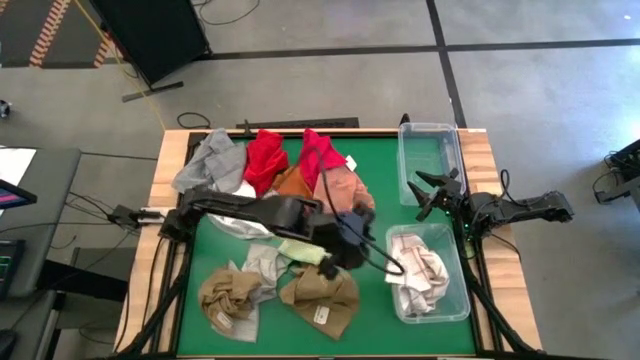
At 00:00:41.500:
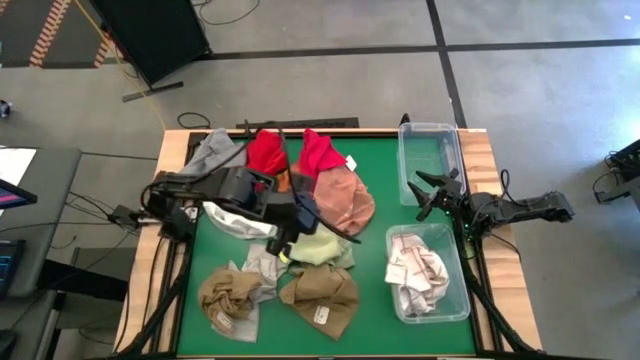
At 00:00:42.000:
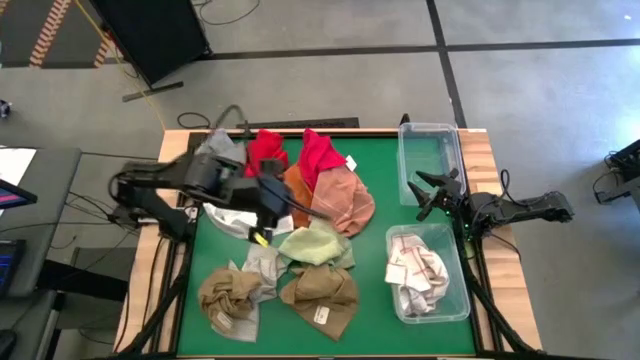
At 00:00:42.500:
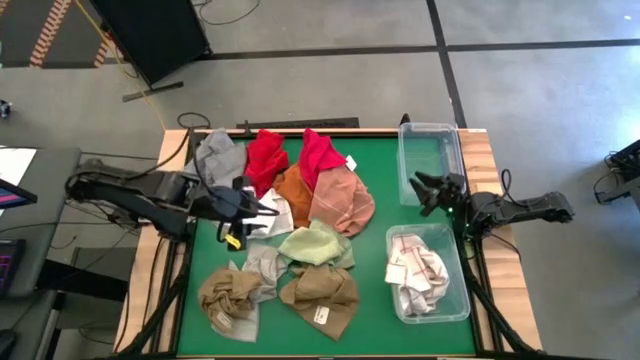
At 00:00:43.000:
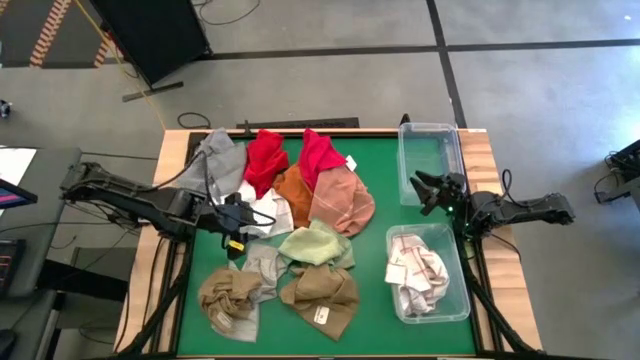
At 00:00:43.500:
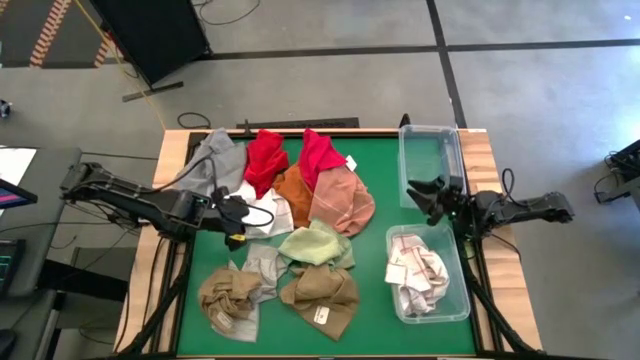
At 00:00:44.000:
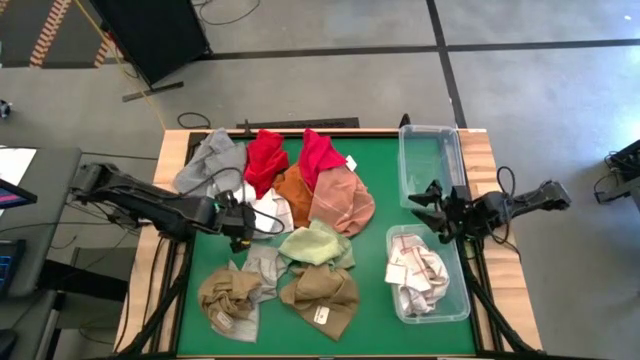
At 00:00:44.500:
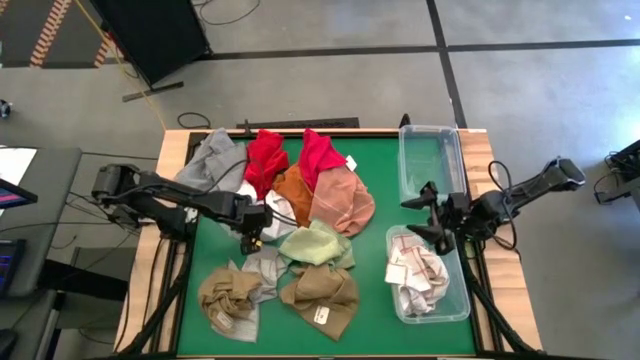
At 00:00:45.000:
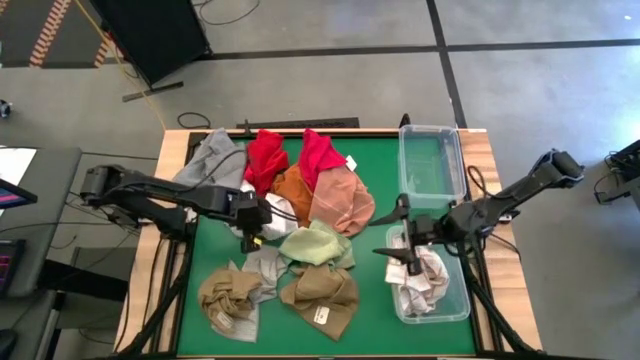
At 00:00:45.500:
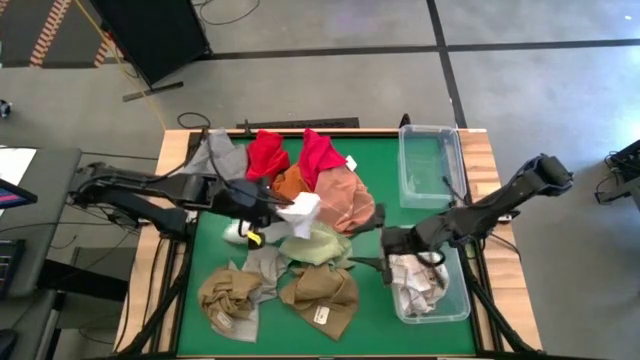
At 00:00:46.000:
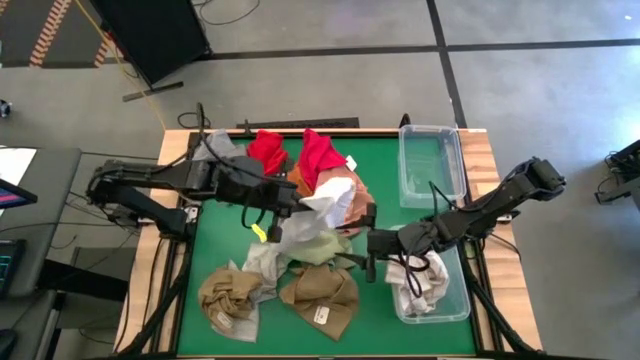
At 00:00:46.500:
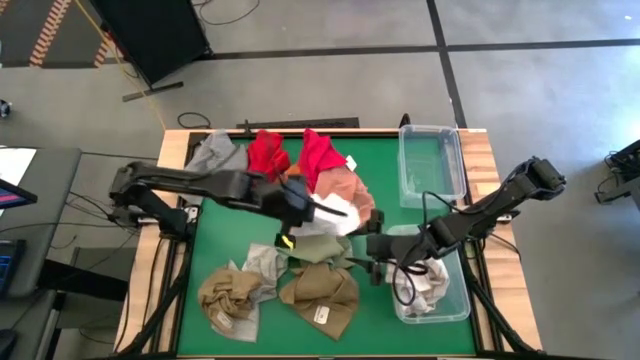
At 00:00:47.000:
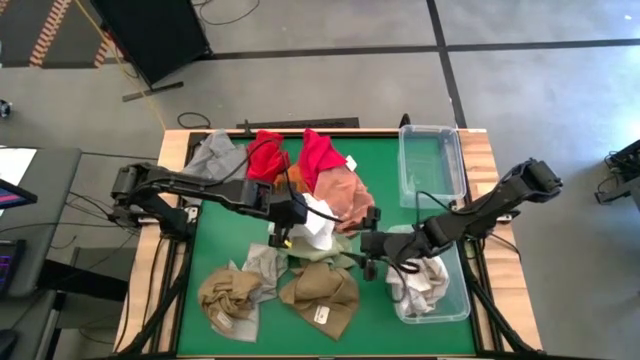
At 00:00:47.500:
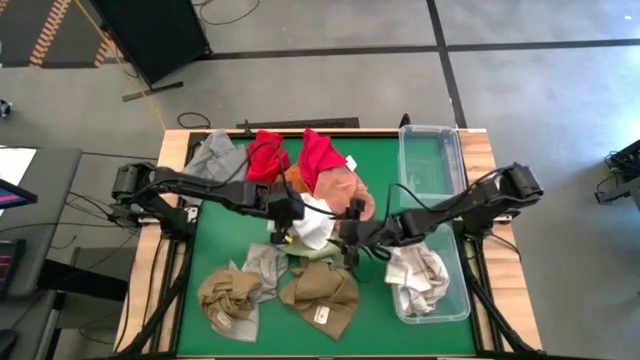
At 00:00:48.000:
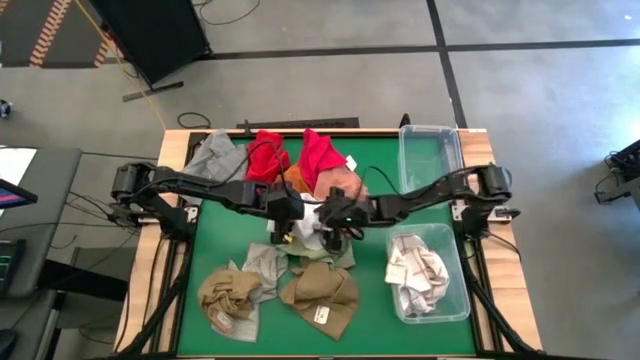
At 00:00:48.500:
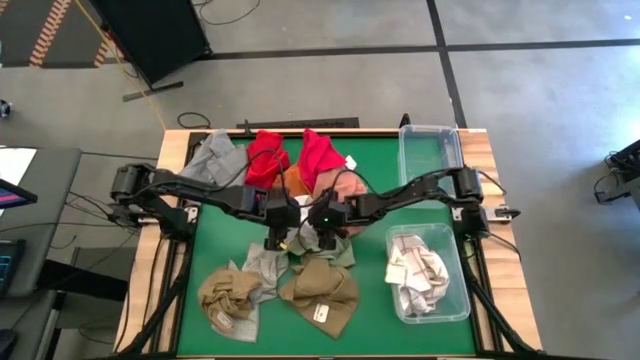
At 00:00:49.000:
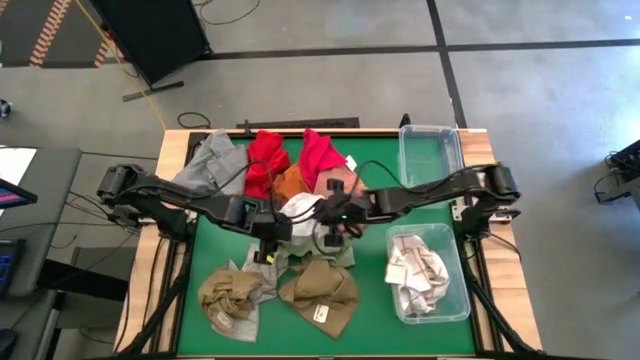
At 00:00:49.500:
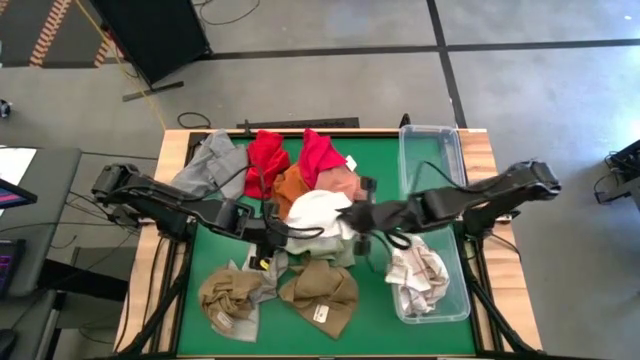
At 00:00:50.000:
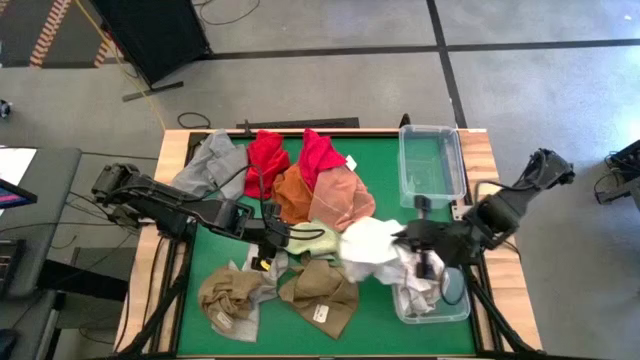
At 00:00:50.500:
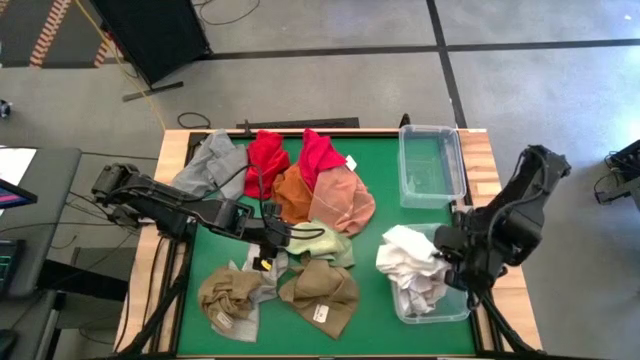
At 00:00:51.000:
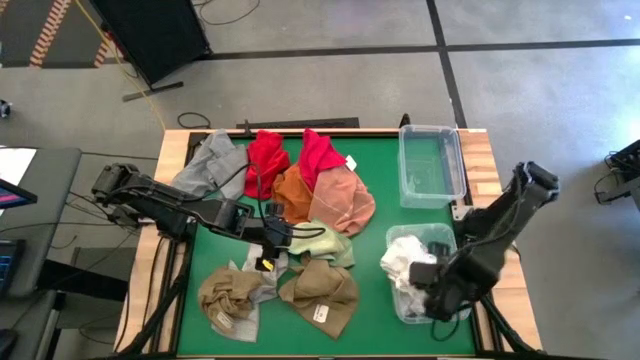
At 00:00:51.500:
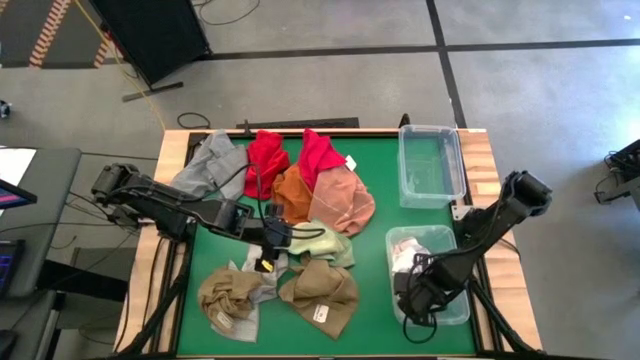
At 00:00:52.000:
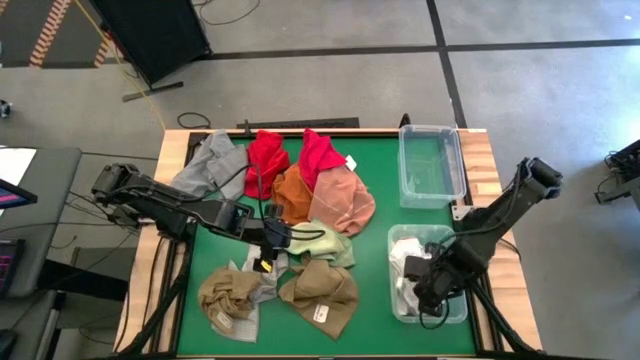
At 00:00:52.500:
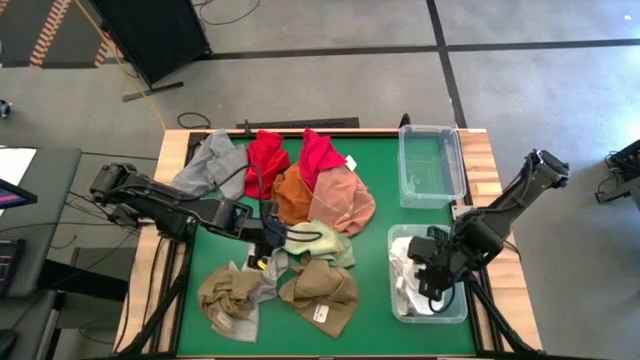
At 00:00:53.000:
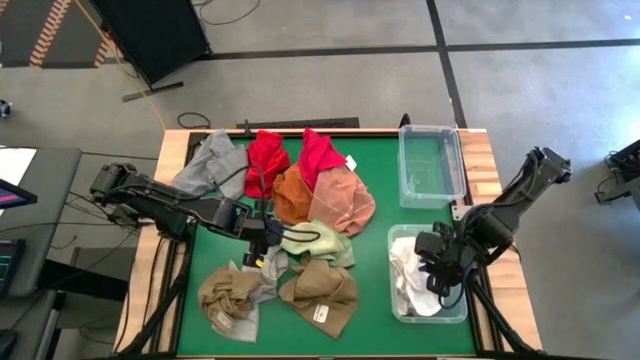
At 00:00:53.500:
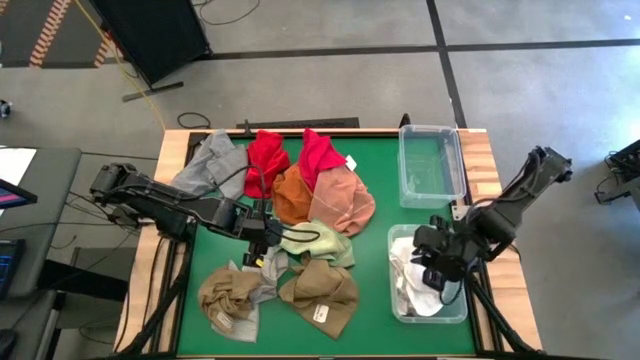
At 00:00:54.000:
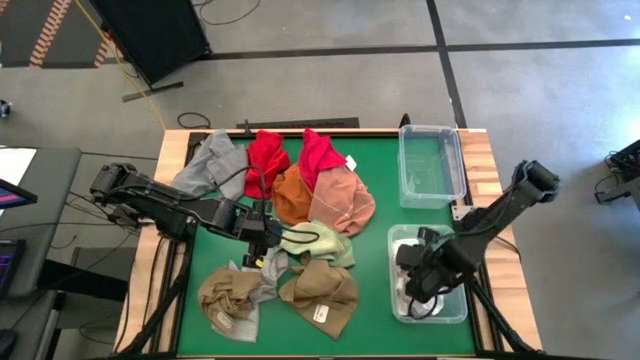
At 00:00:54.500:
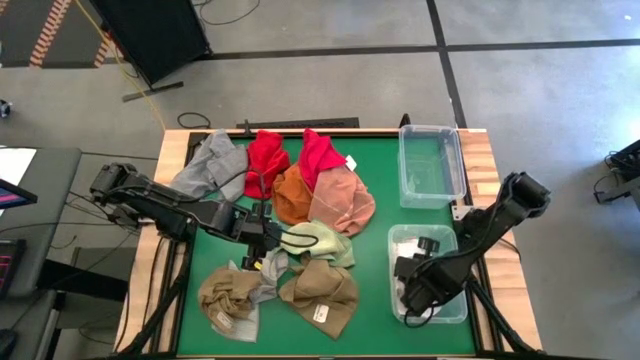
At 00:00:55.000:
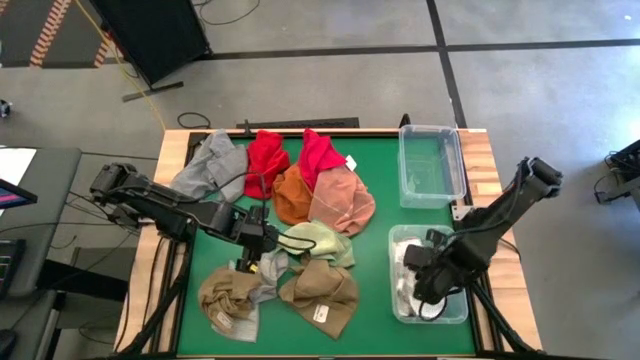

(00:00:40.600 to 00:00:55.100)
Task: Sort towels by color in basket
Put the white towel into the bottom transparent bin

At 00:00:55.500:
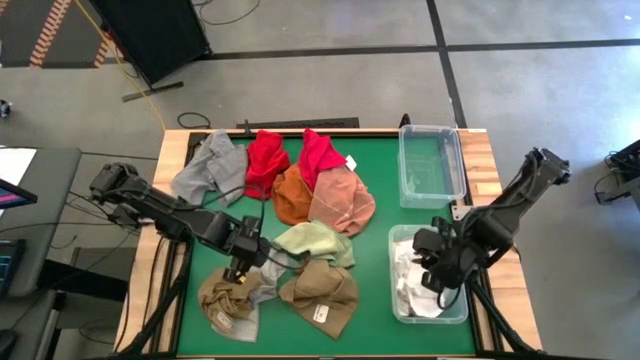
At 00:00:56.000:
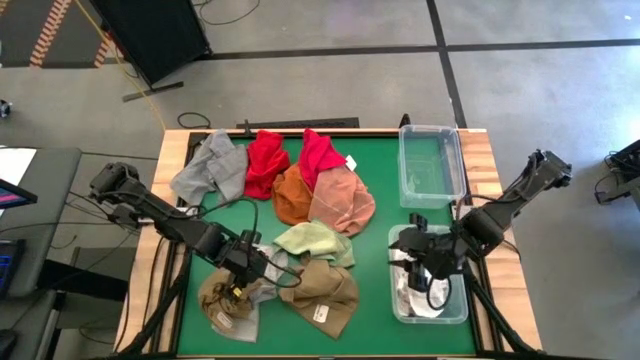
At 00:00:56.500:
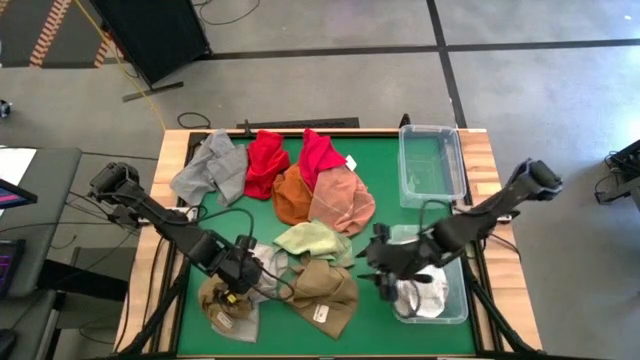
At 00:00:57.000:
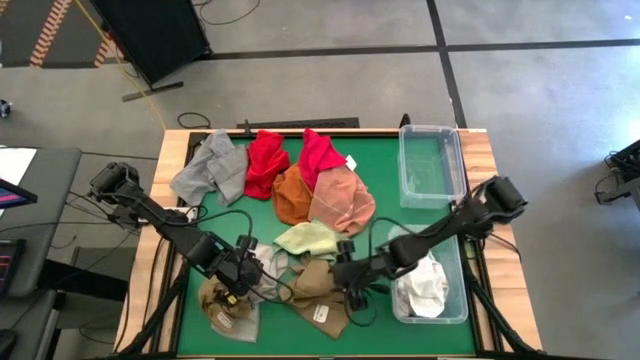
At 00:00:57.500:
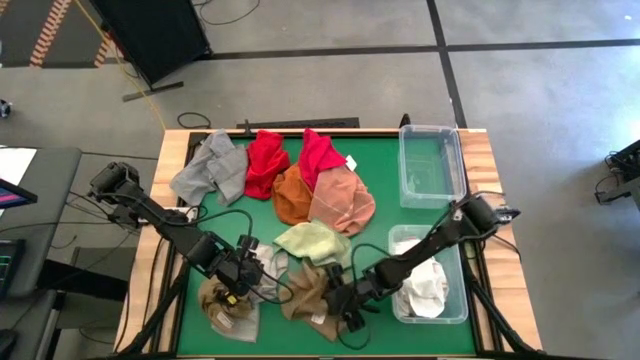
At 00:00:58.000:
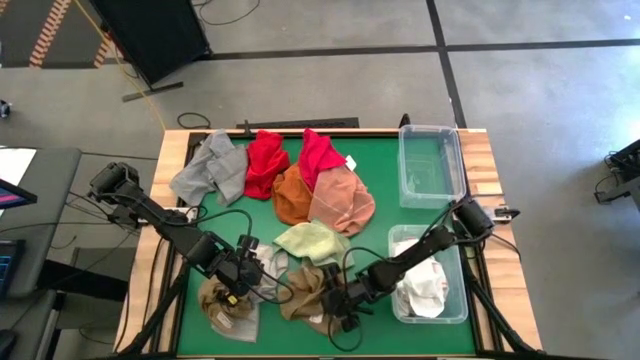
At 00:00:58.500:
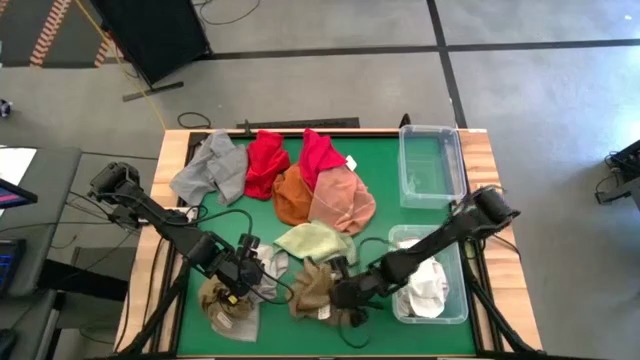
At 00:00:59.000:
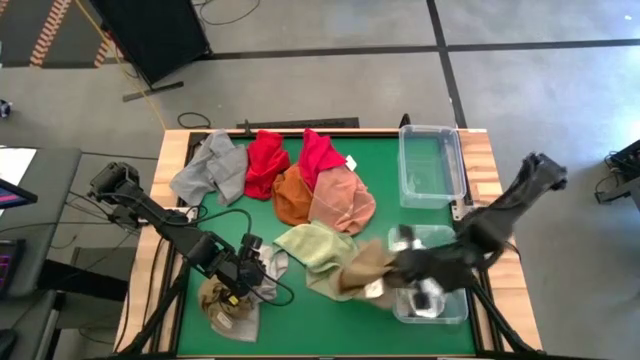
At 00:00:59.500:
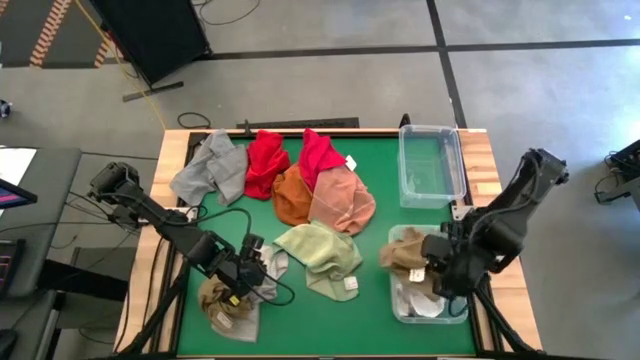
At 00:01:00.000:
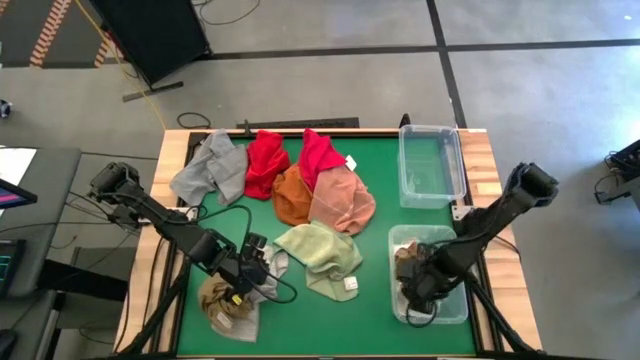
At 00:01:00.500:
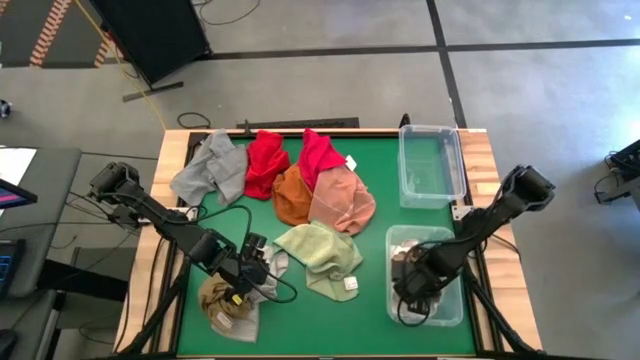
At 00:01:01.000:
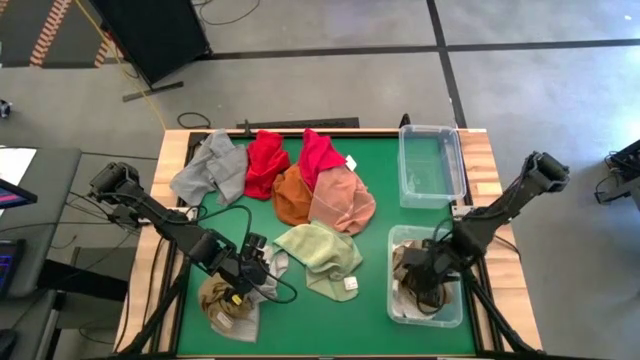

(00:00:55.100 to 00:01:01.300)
Put the brown towel into the bottom transparent bin
